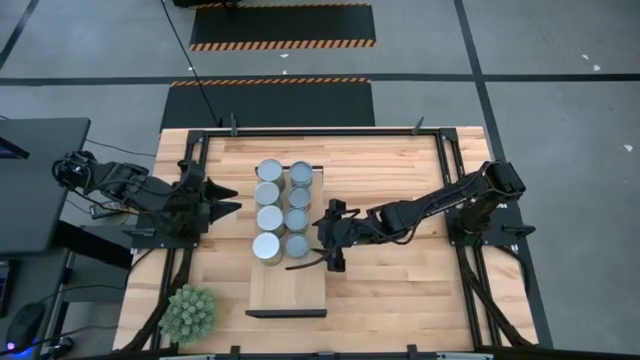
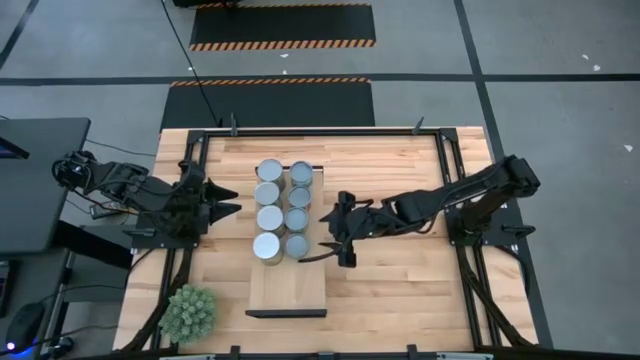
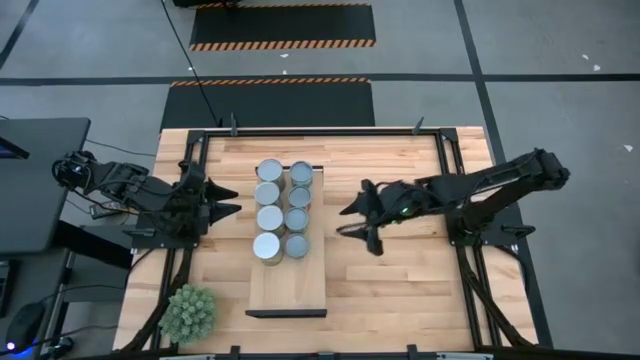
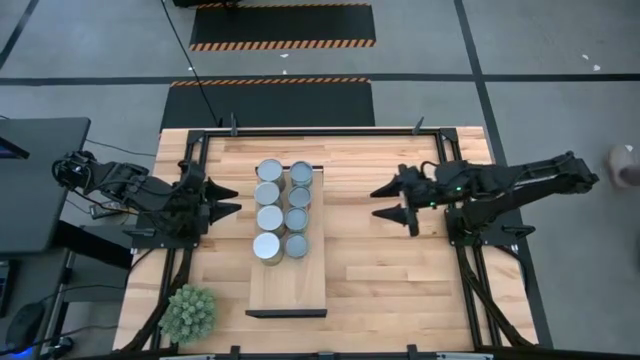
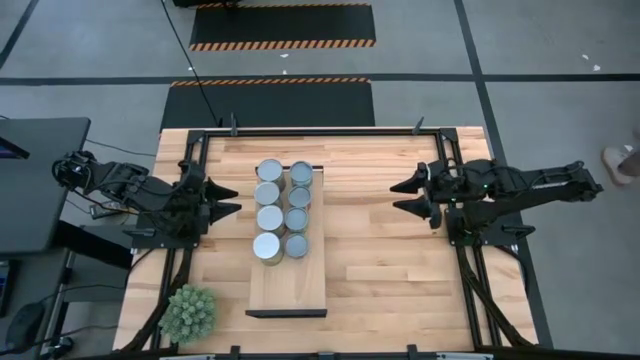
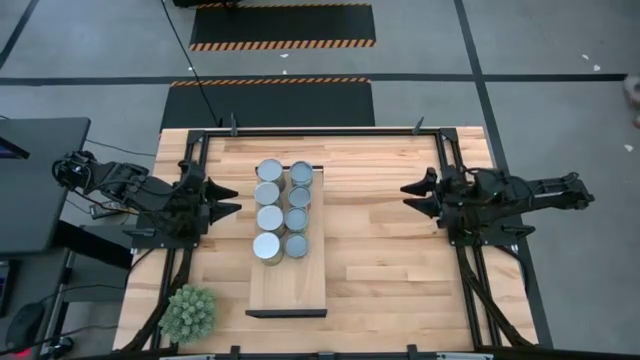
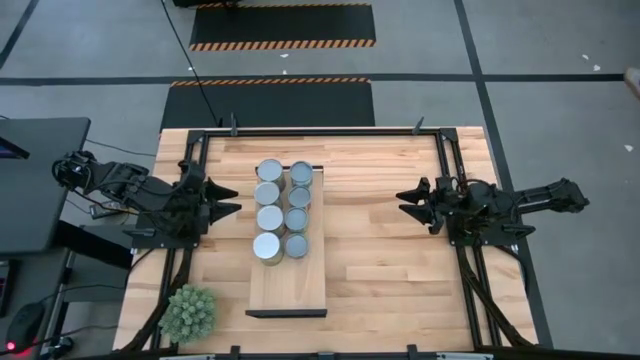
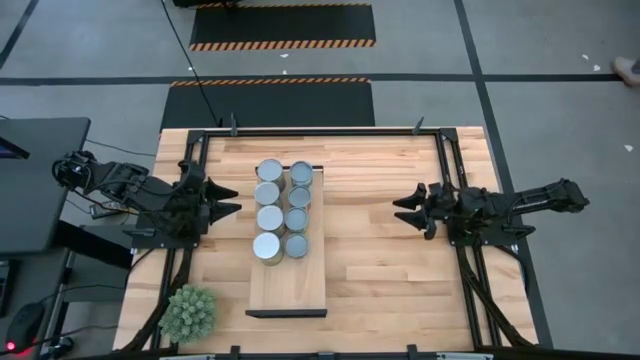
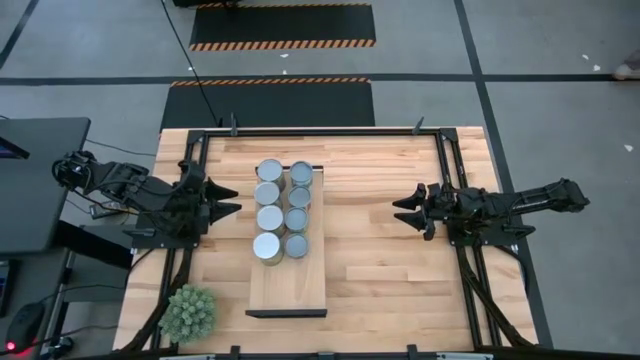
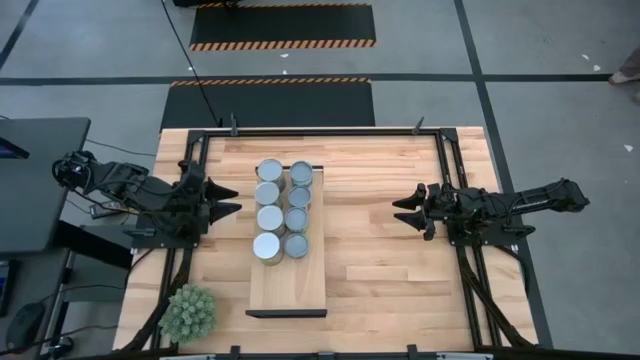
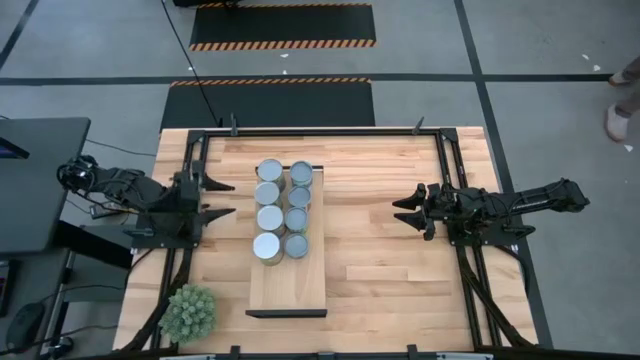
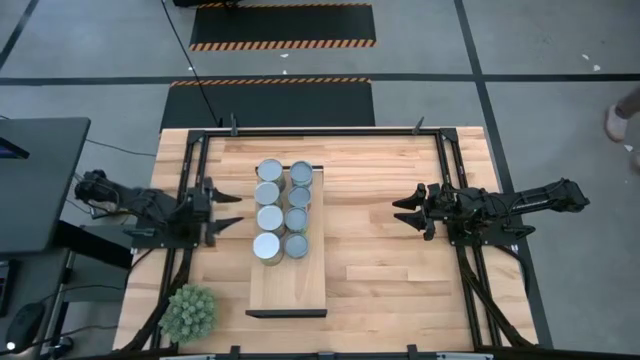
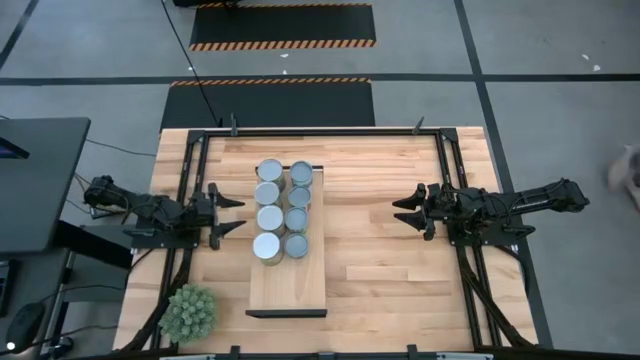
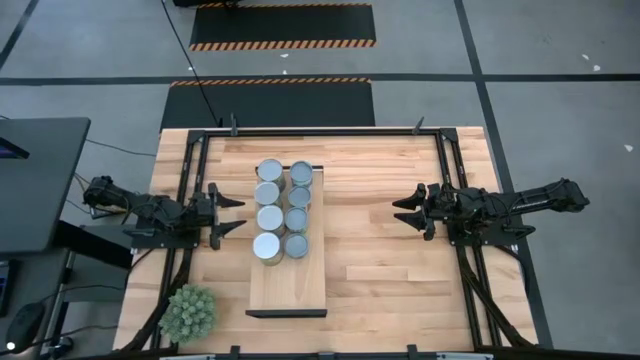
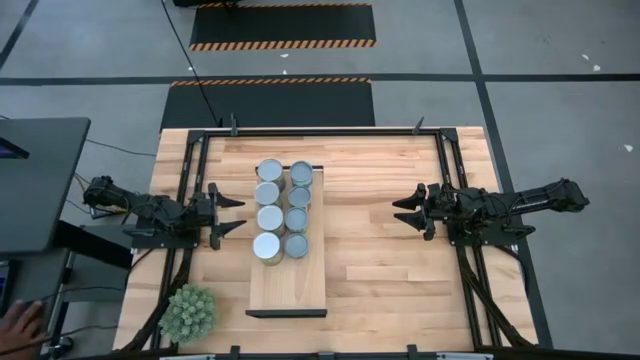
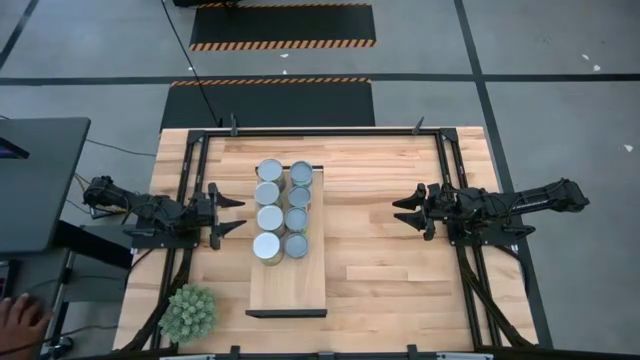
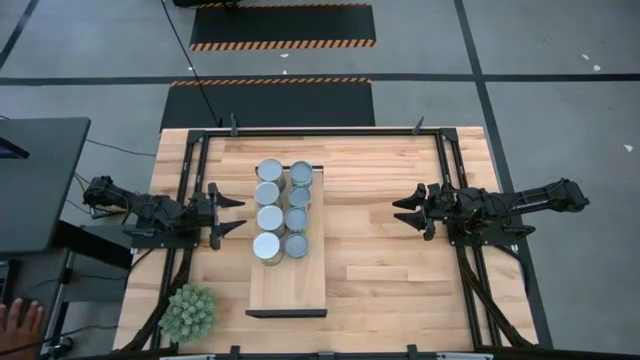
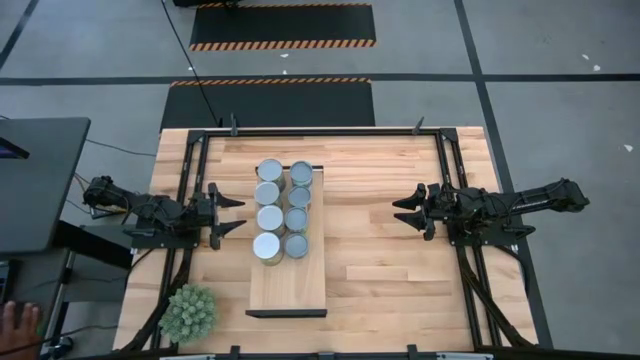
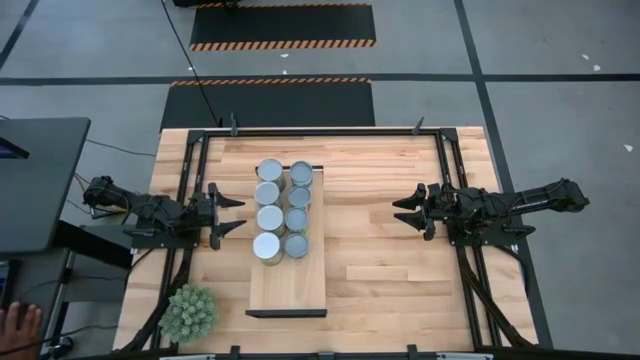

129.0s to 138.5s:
Task: Pick and place cans onto a shelf
Return to Home Position

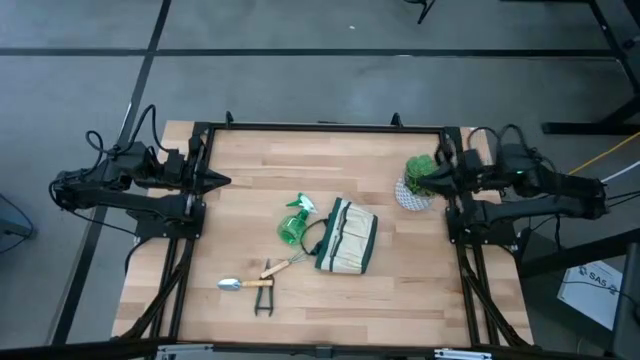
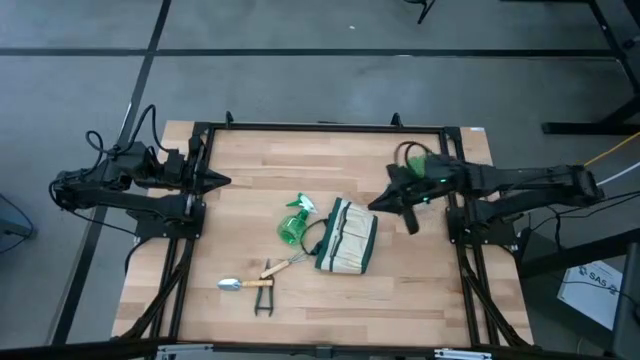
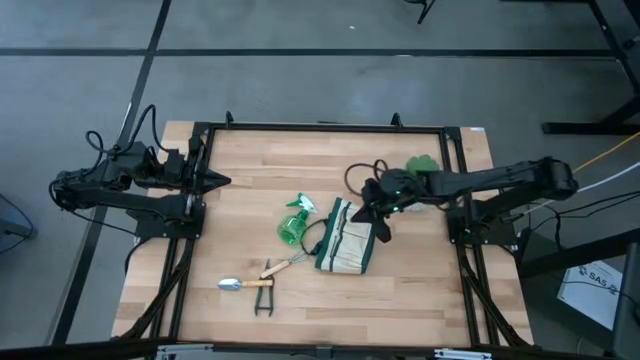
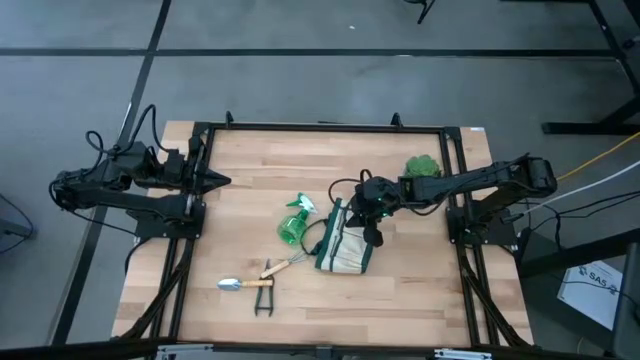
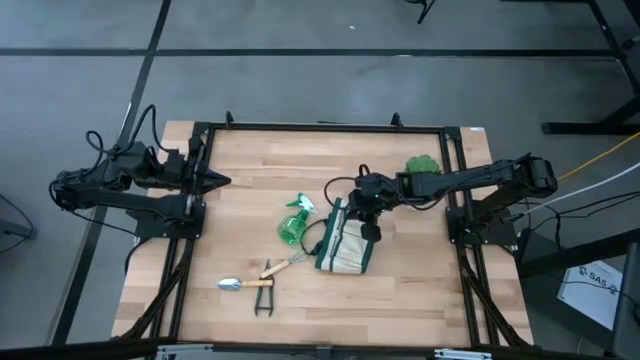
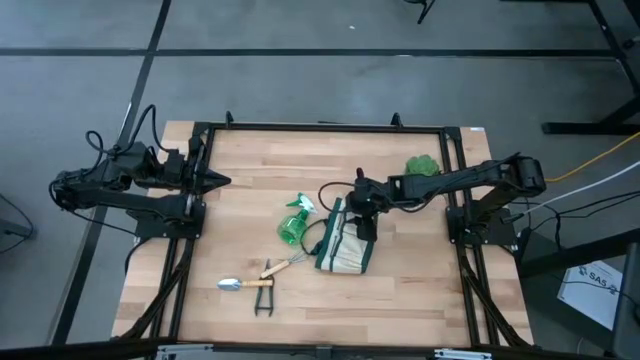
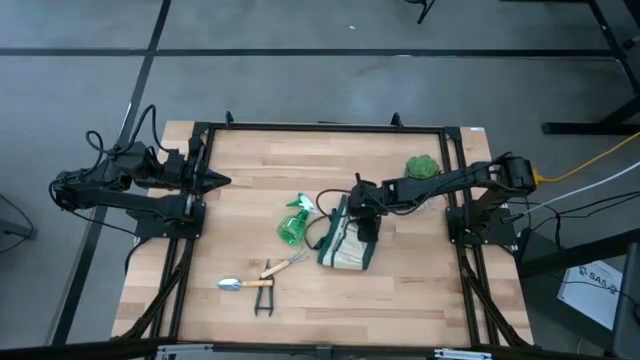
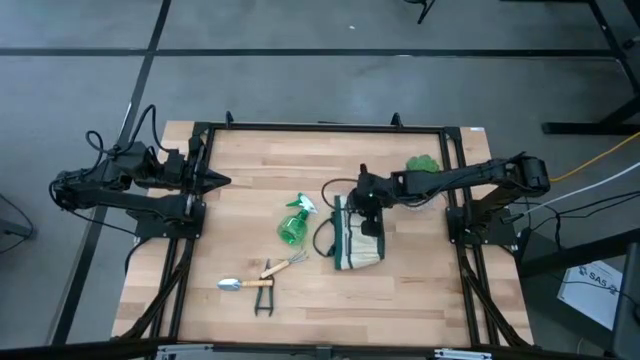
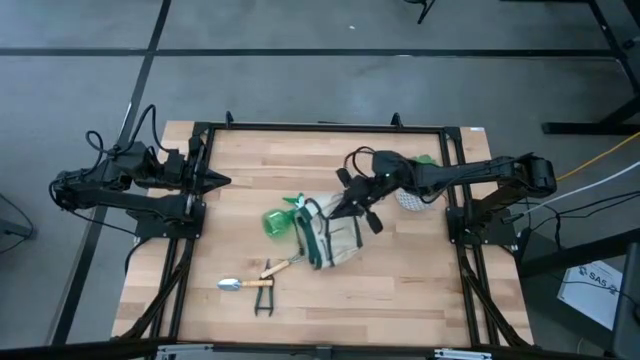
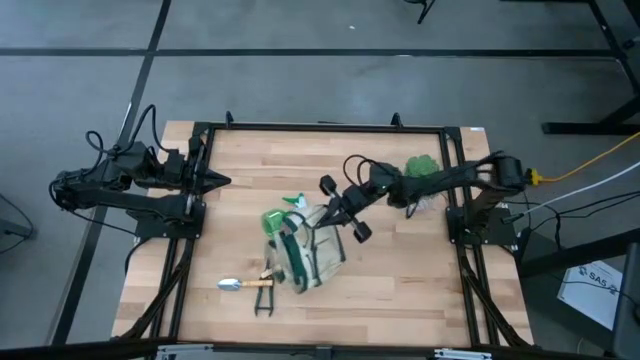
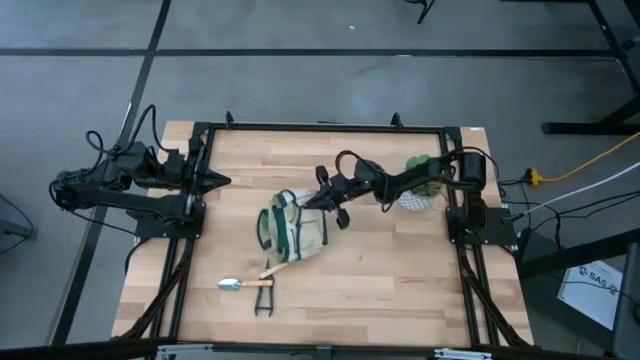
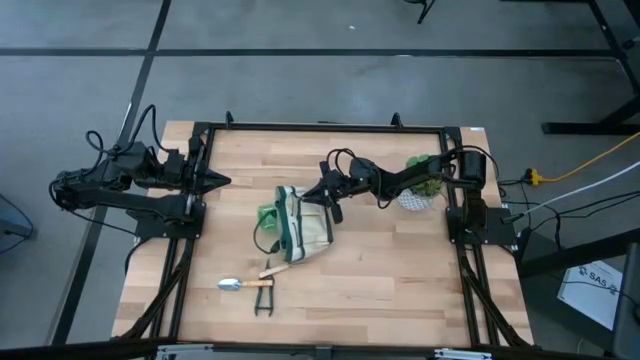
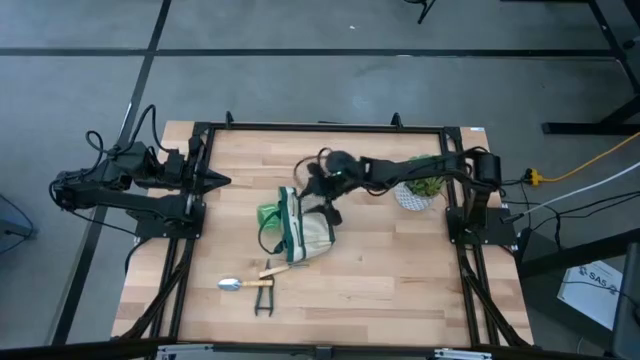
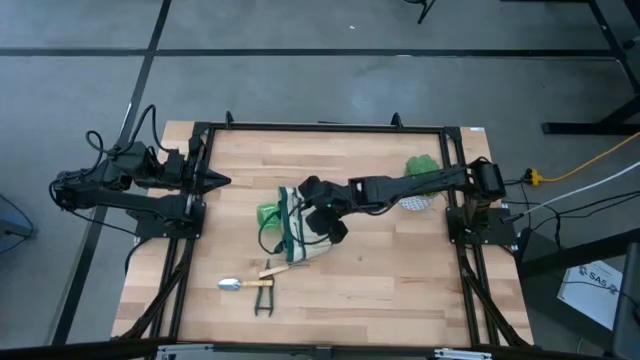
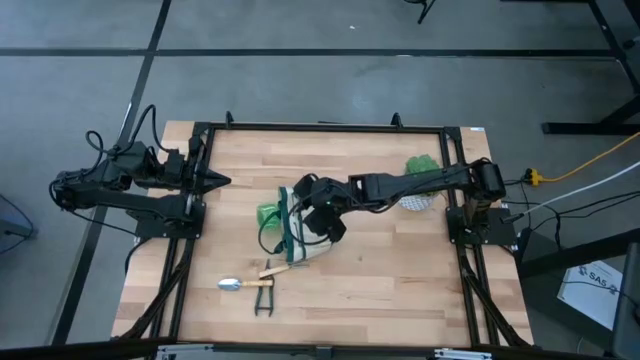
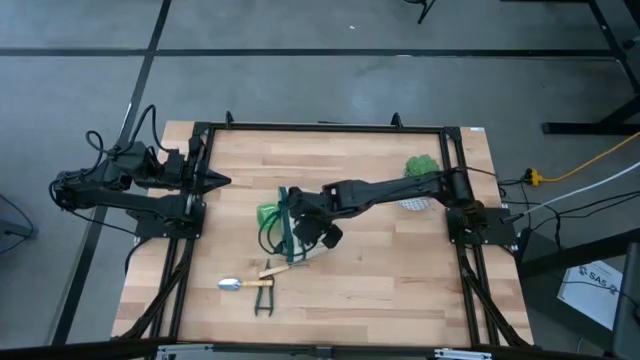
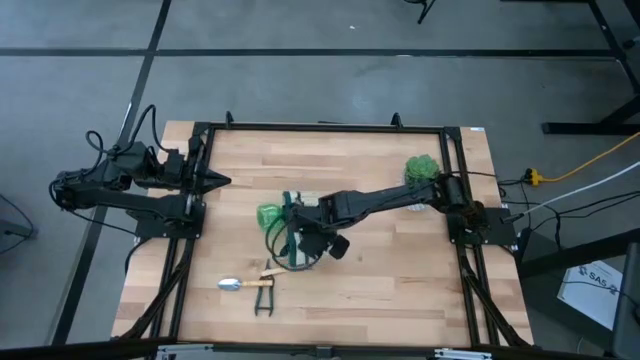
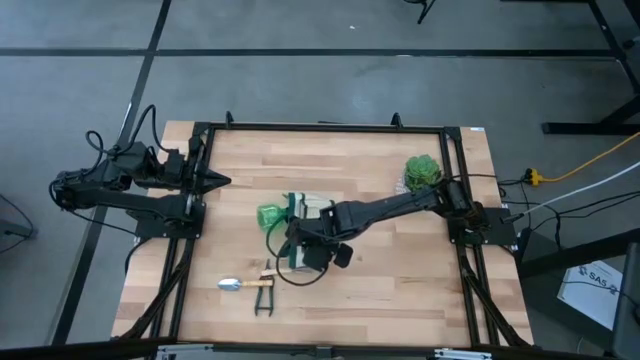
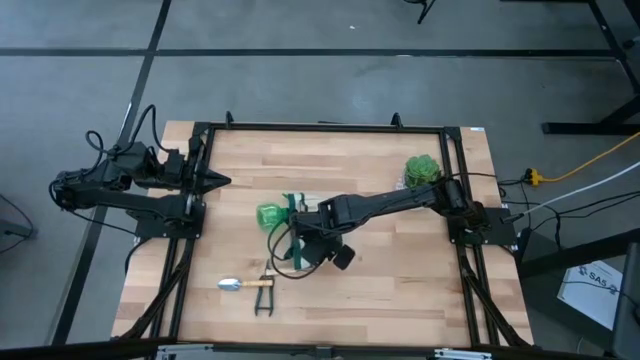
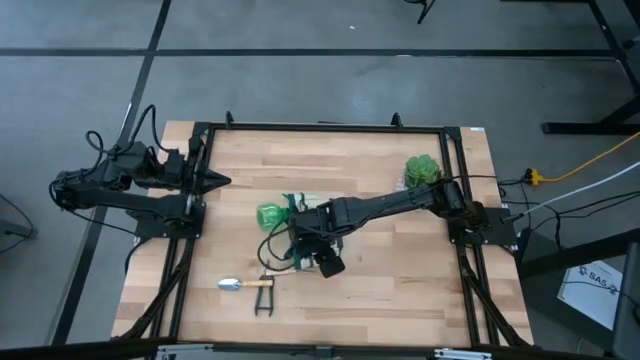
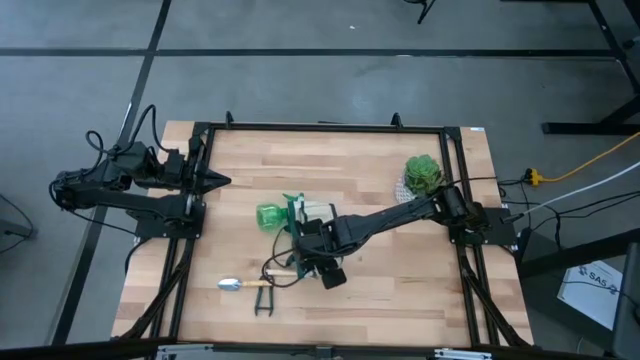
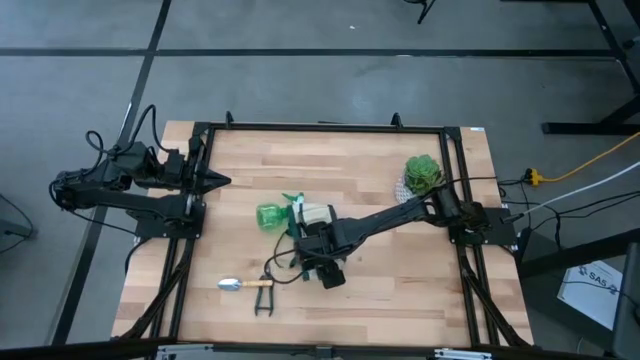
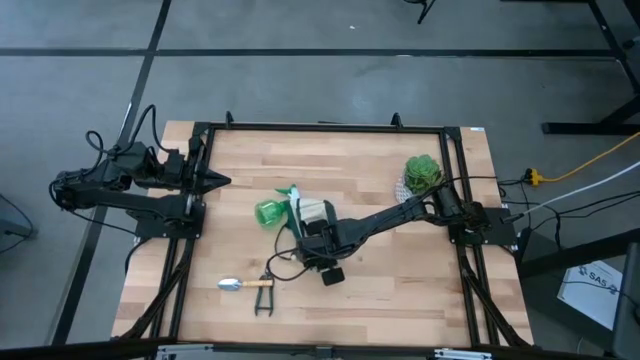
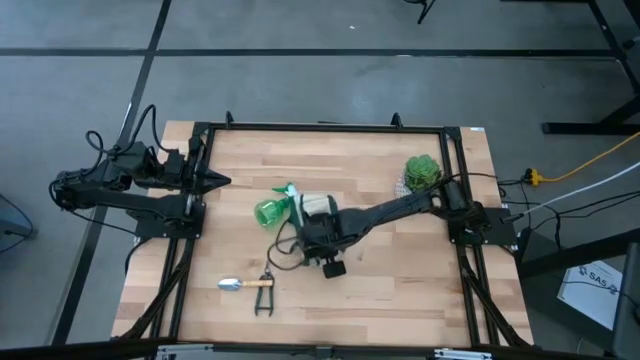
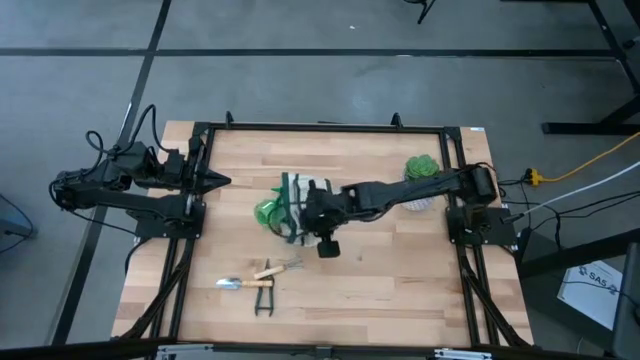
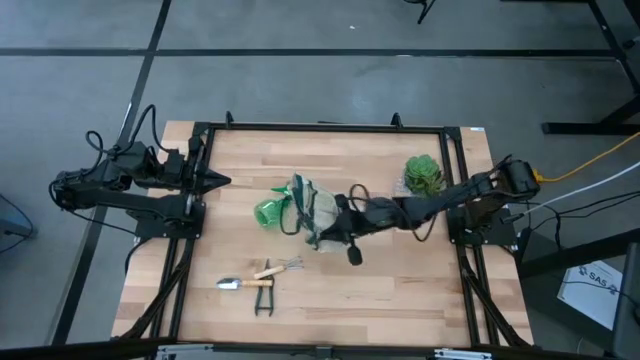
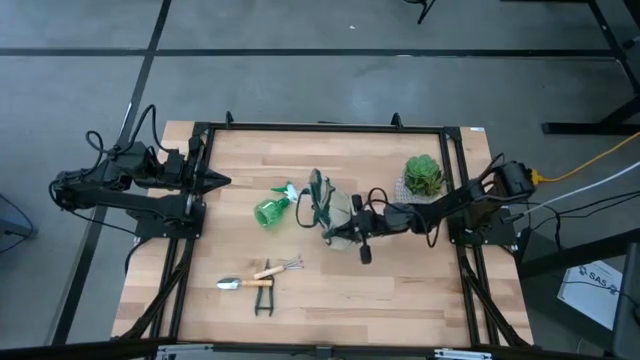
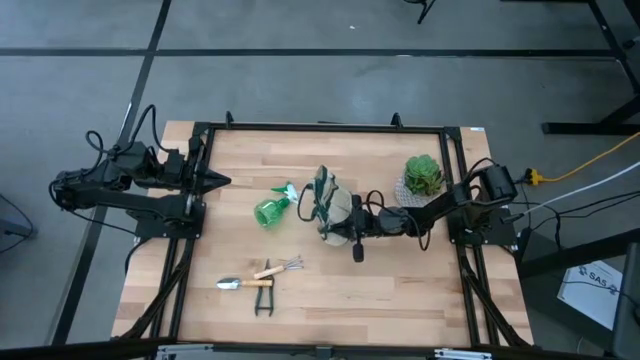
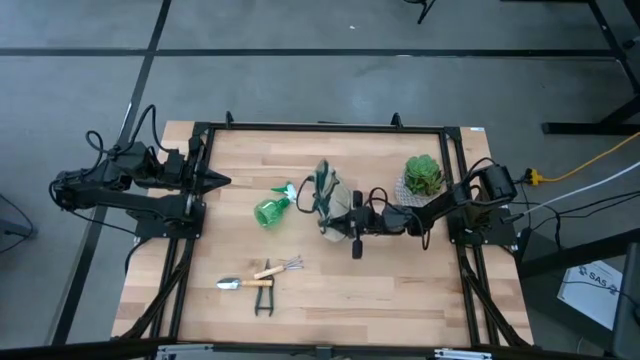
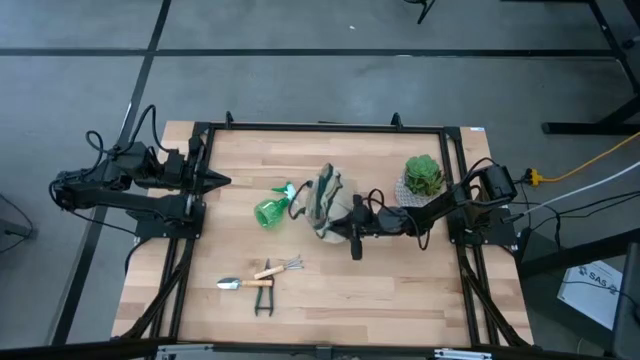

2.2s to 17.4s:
Task: Pick & Place Garden tools in Gardening bag
Prepare the white gardening bag
